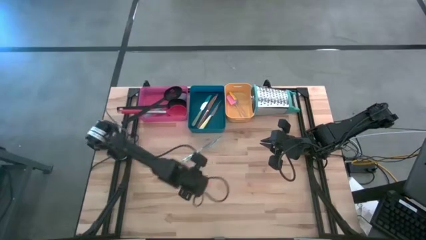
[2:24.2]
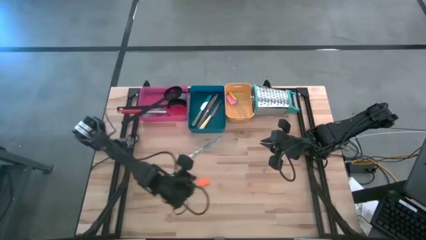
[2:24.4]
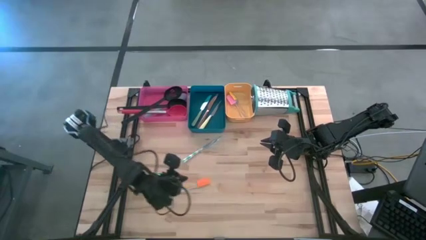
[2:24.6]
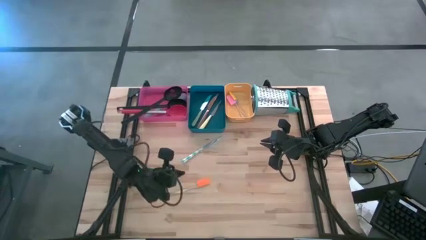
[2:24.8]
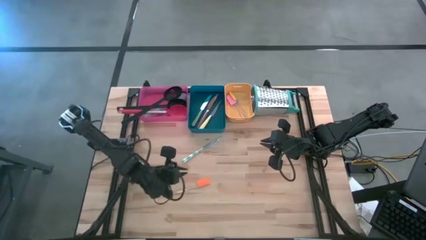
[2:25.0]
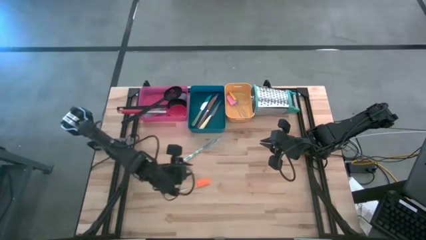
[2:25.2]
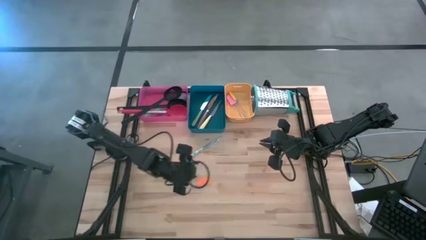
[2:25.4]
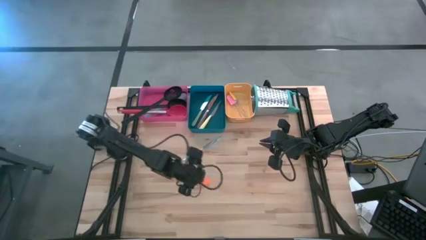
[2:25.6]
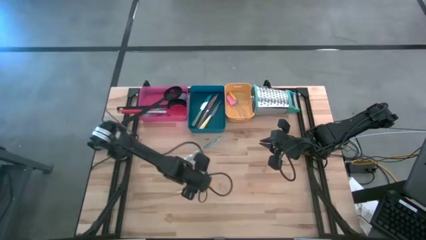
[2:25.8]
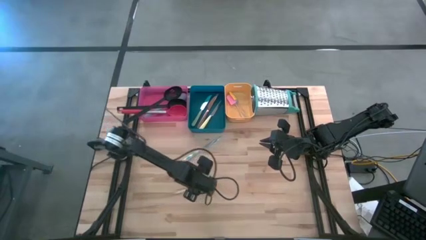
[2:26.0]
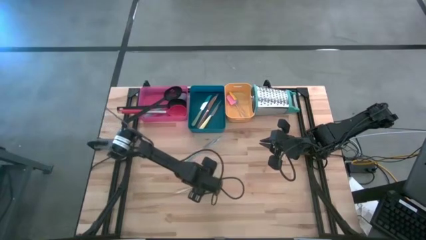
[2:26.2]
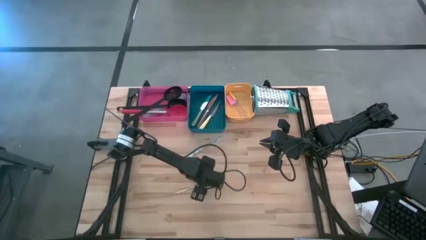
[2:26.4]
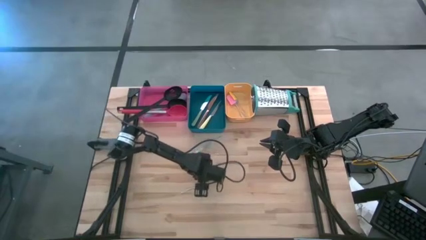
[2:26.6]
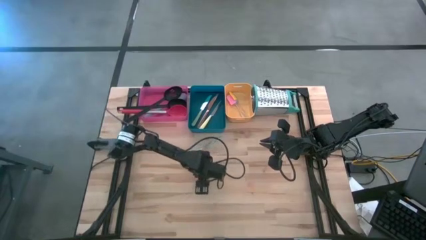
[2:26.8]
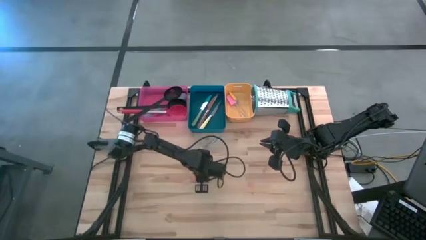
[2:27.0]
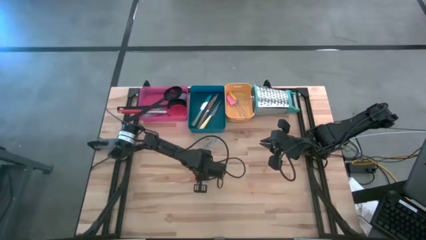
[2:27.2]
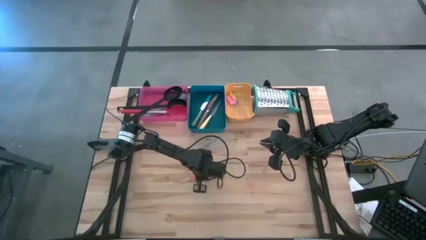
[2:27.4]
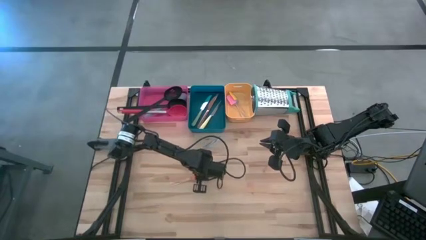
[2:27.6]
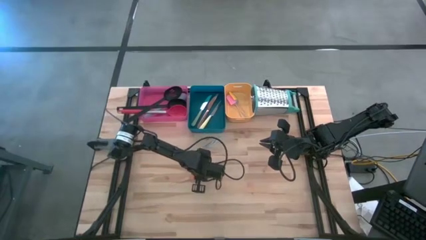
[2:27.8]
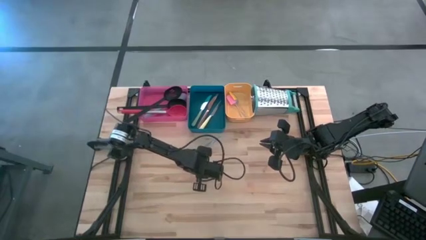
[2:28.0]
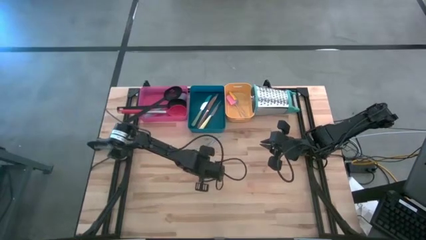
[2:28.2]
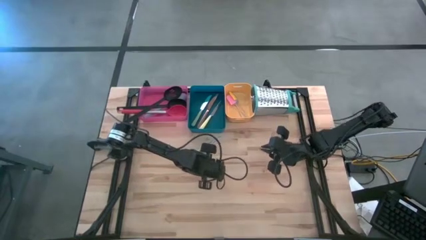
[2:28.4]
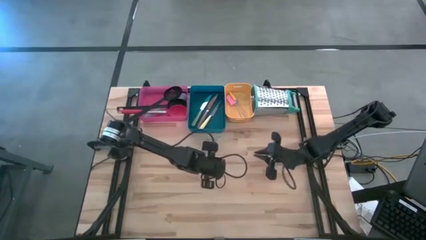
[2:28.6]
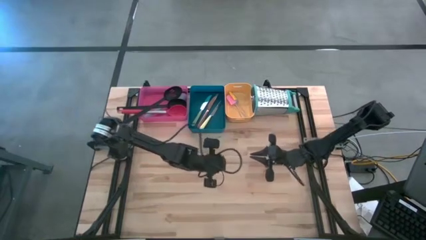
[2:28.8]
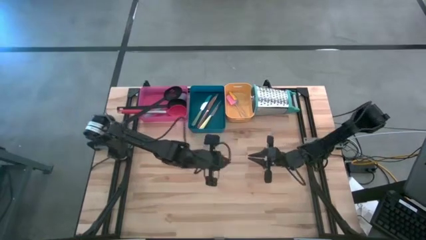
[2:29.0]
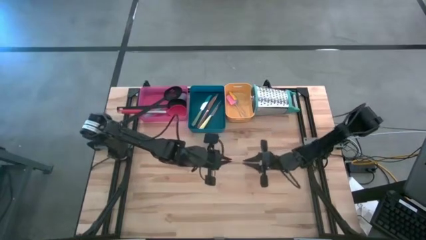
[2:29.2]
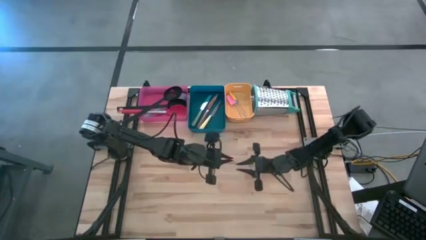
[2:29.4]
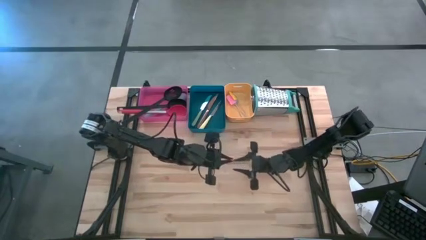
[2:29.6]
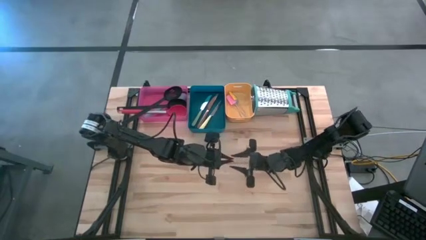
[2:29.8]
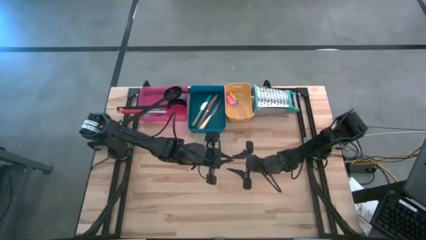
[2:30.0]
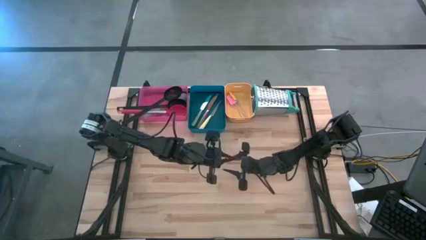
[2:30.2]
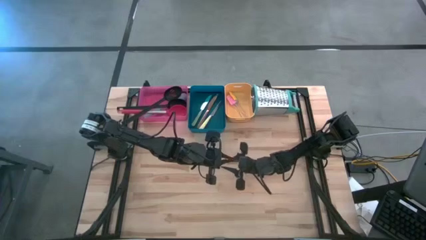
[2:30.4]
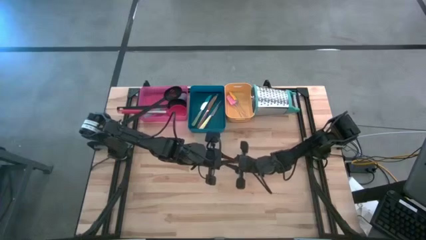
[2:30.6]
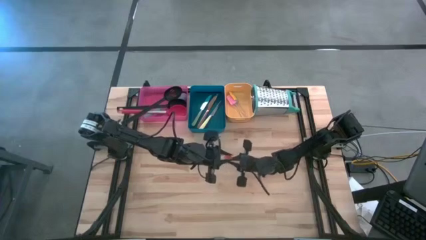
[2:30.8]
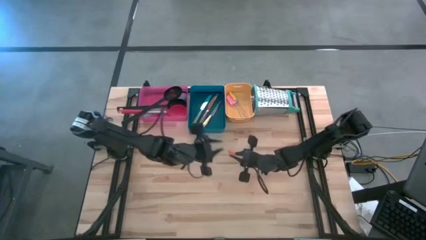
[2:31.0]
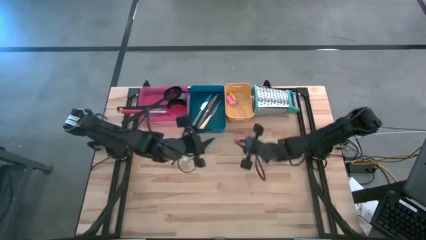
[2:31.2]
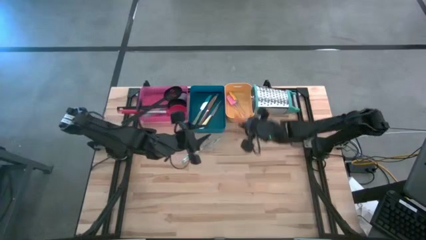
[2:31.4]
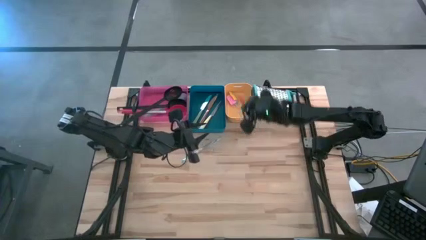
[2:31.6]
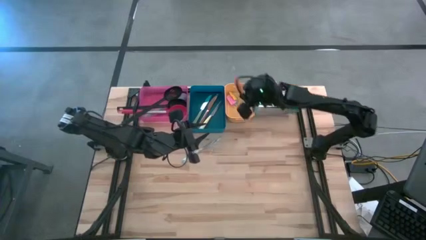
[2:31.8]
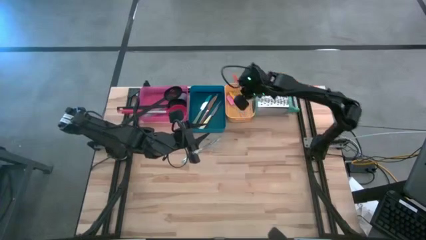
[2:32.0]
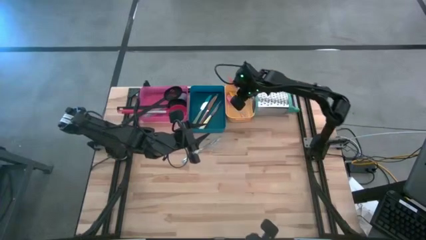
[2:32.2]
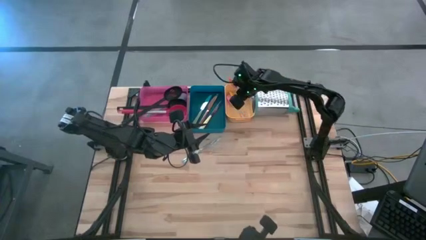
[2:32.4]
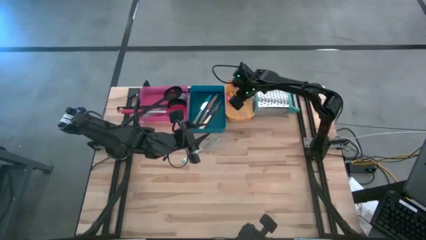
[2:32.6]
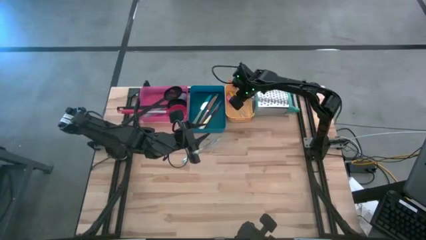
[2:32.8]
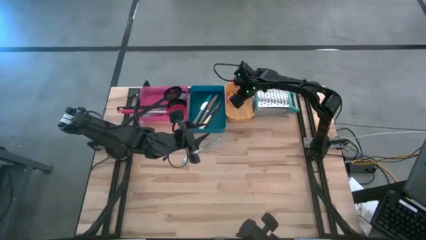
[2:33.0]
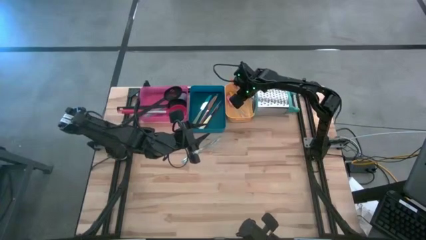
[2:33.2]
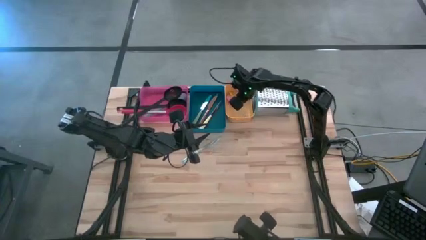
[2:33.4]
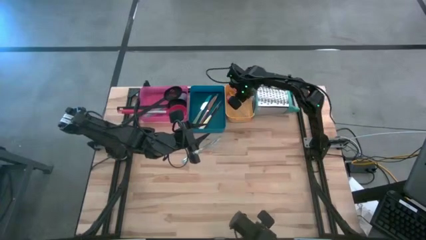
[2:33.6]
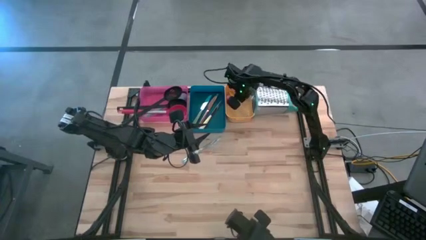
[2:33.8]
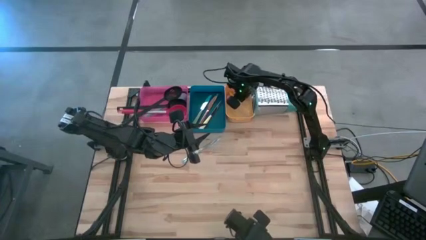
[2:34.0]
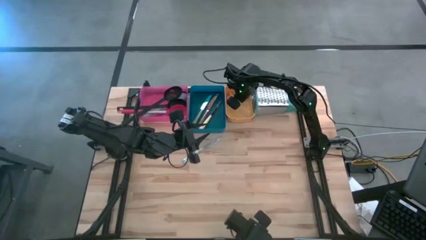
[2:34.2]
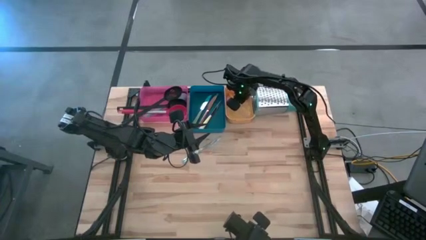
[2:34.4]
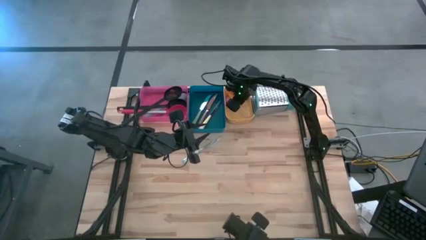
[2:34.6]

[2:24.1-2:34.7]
Task: Pick & Place Kitchen Items
Put the orange spatula into the yellow bin

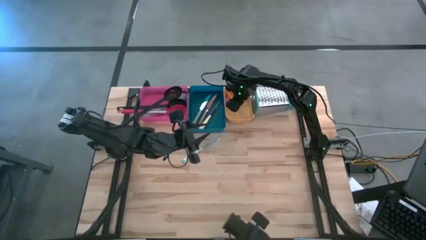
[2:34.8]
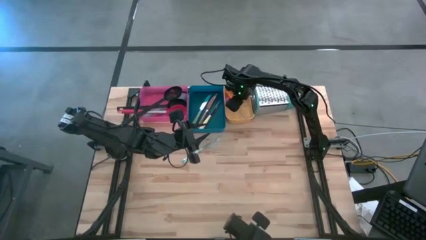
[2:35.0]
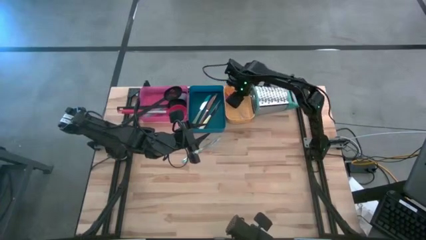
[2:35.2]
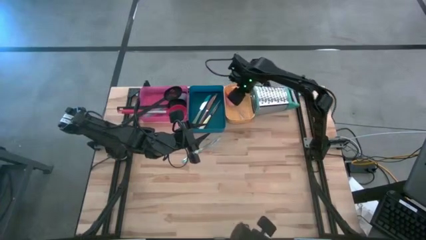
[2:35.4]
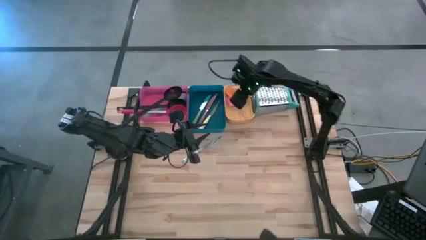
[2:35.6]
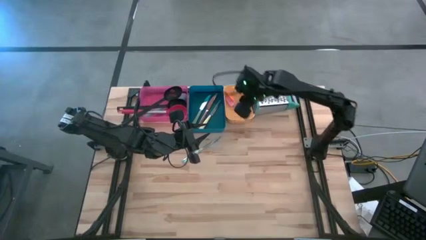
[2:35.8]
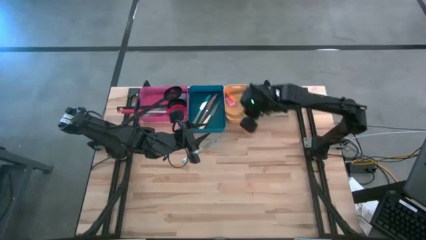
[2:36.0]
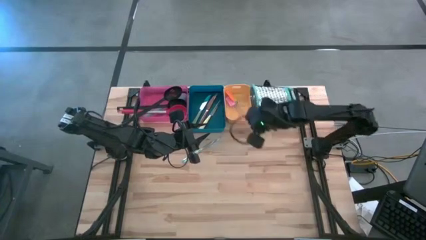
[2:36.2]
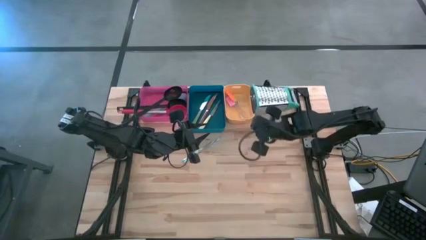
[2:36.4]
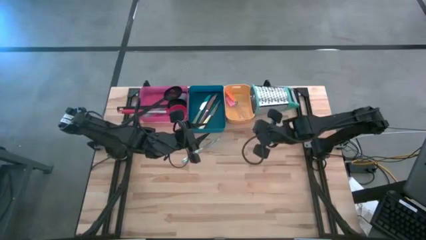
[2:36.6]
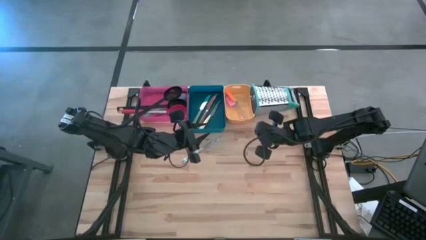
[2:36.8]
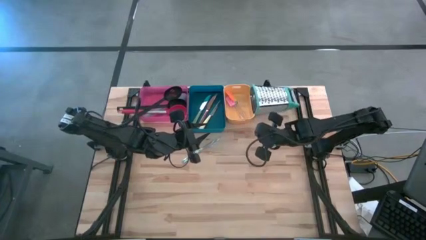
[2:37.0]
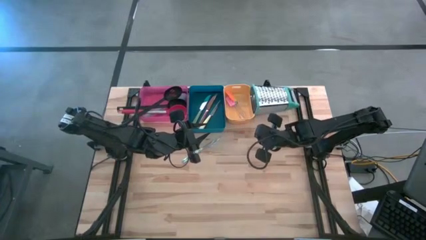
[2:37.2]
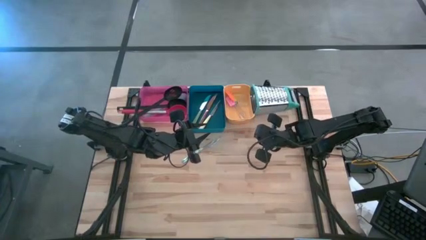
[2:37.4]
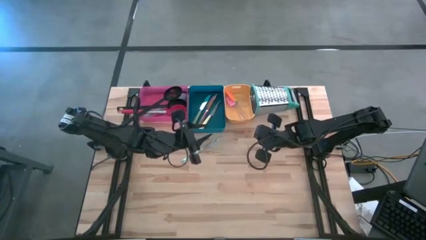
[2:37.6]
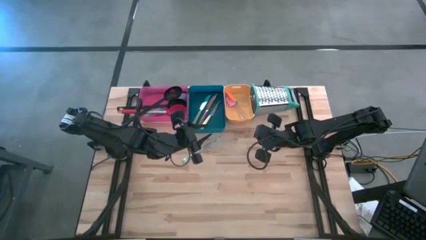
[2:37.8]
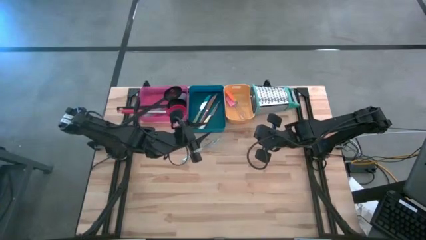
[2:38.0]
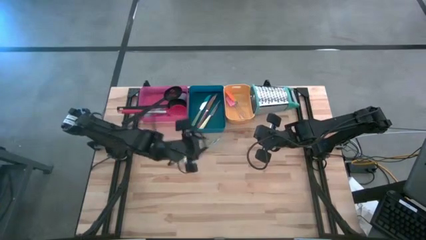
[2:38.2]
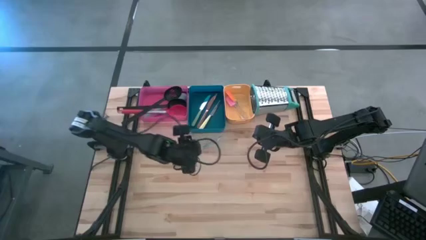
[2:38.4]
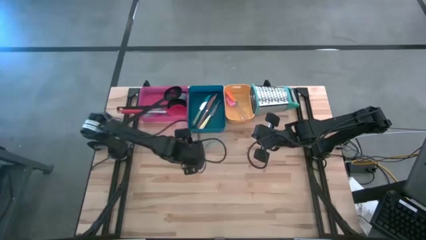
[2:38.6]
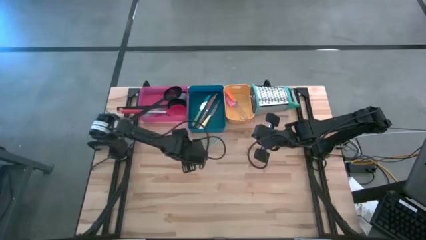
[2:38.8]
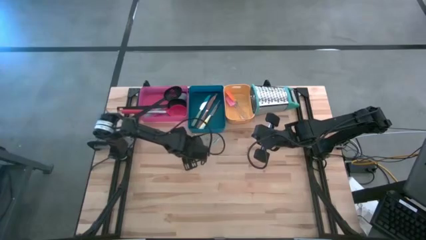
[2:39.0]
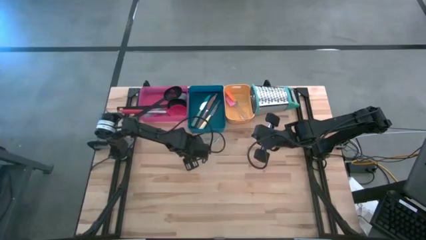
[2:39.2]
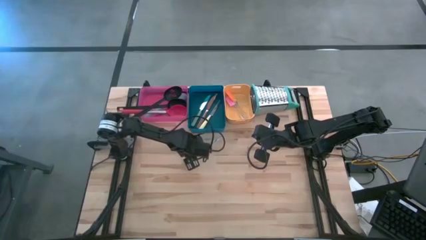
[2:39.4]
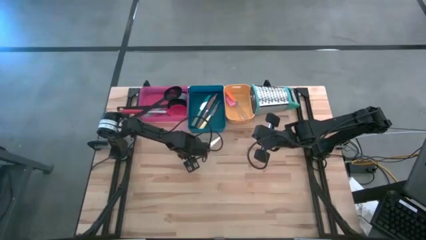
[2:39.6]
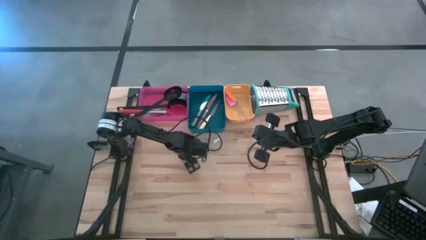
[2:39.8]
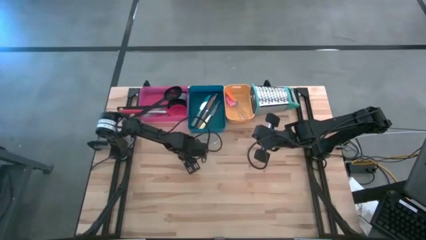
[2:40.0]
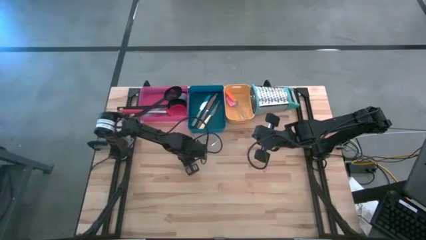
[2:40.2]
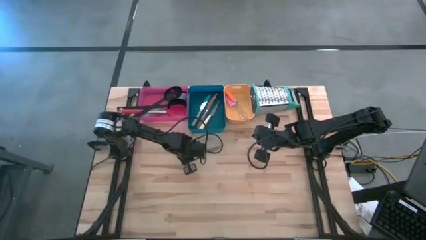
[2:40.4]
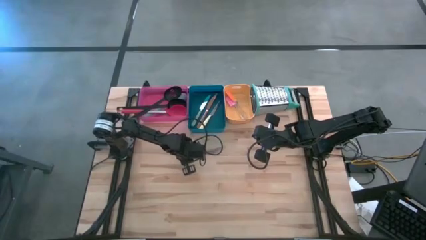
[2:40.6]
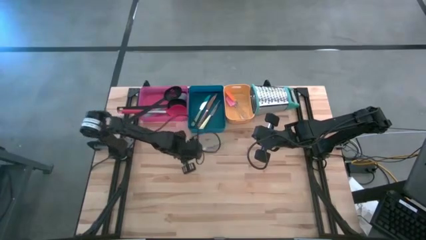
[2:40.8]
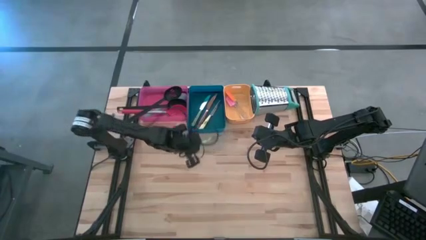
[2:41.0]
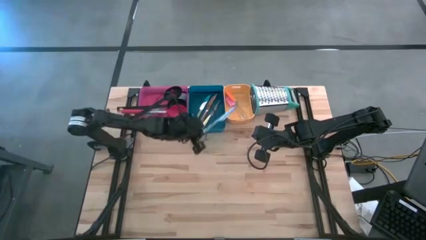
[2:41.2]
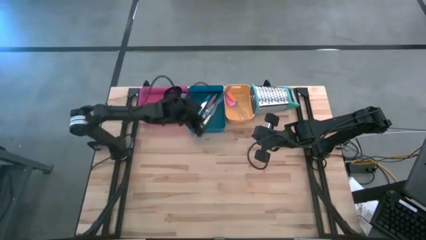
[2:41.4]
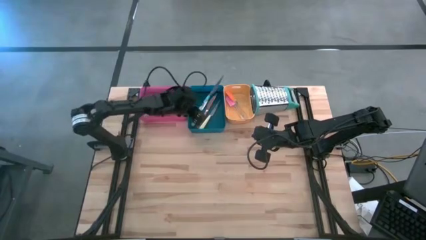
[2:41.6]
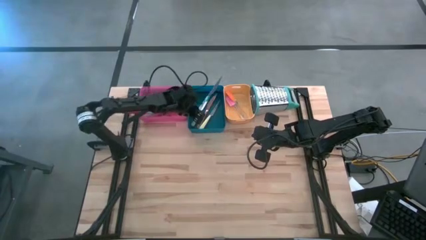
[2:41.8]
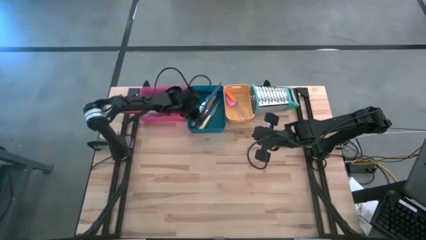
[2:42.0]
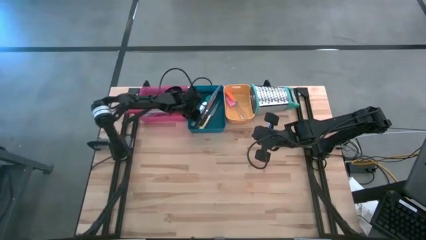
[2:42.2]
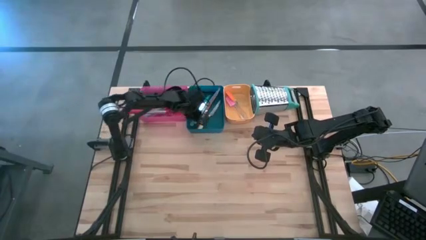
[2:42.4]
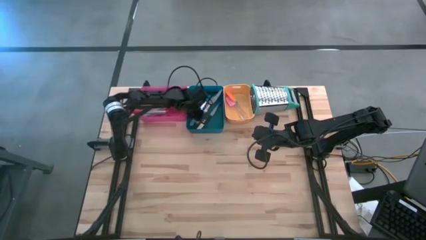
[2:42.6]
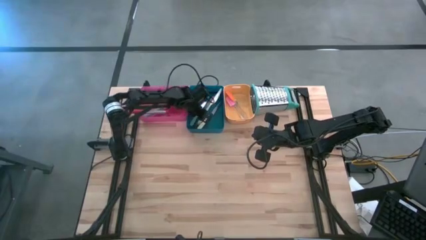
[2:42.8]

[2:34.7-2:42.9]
Put the blue knife into the blue bin
